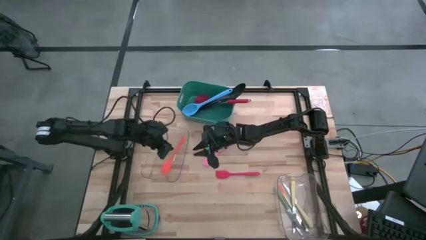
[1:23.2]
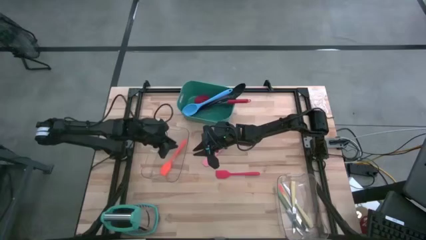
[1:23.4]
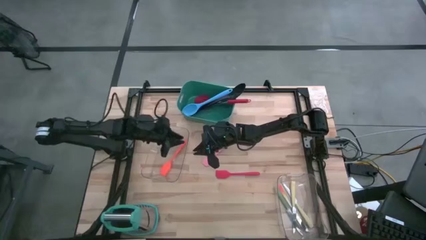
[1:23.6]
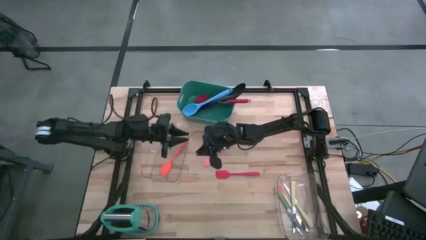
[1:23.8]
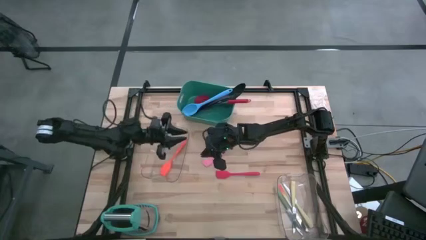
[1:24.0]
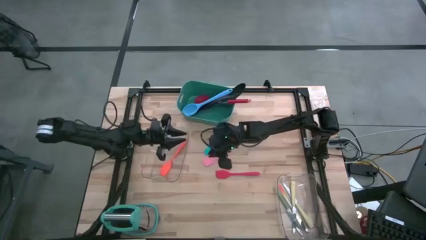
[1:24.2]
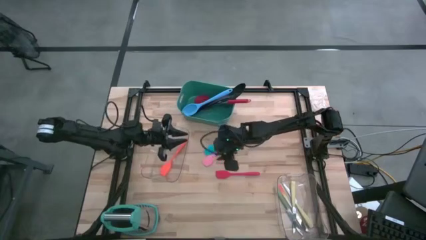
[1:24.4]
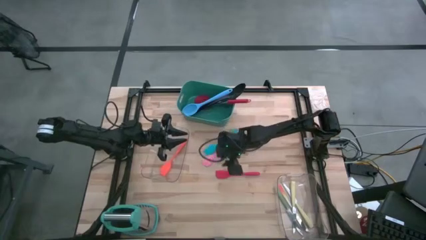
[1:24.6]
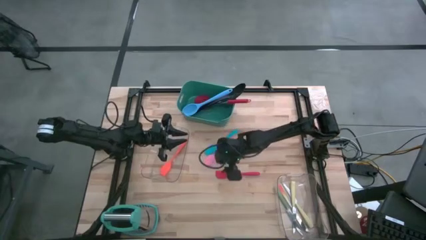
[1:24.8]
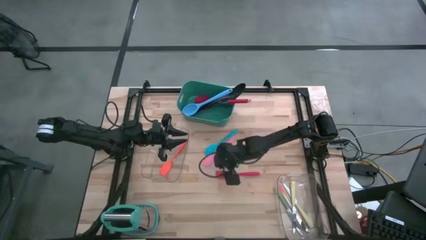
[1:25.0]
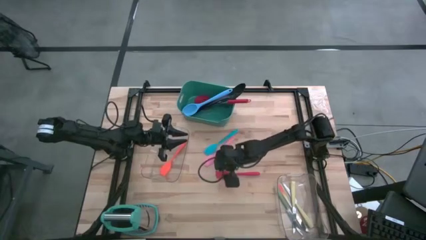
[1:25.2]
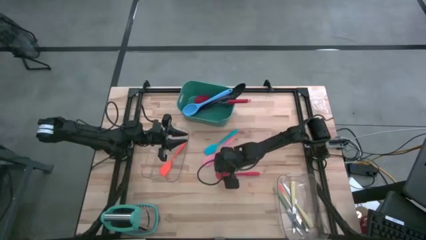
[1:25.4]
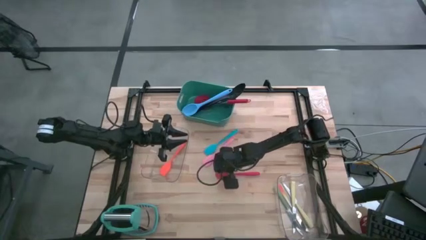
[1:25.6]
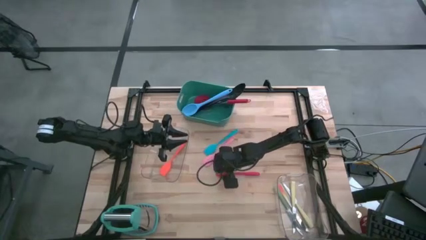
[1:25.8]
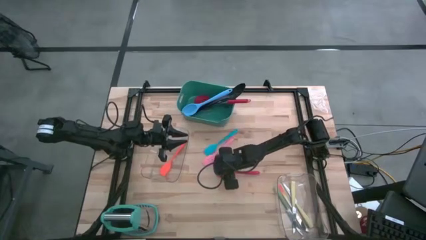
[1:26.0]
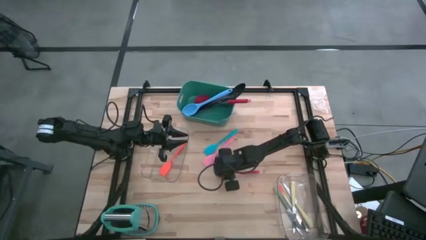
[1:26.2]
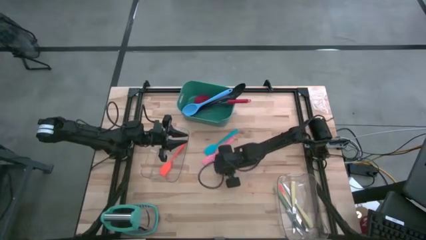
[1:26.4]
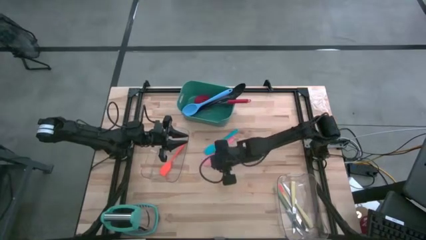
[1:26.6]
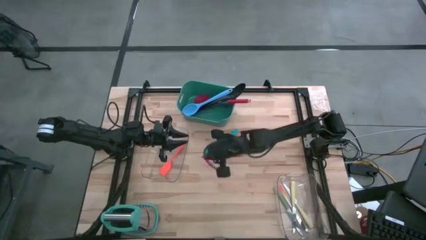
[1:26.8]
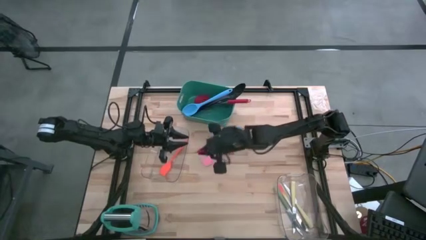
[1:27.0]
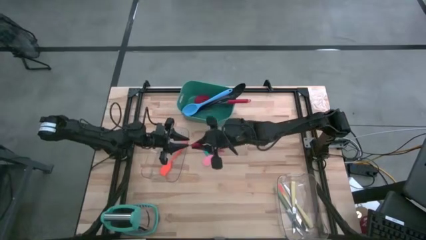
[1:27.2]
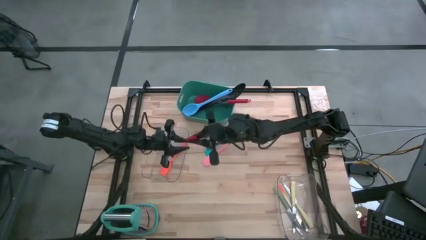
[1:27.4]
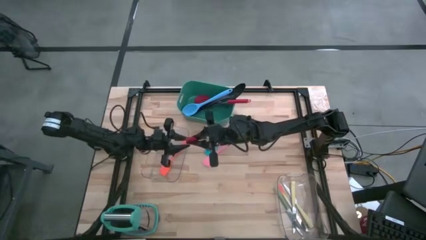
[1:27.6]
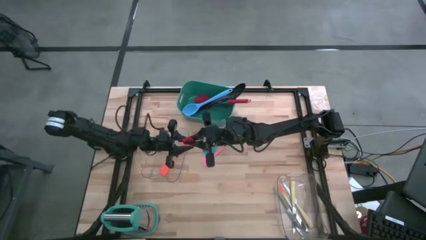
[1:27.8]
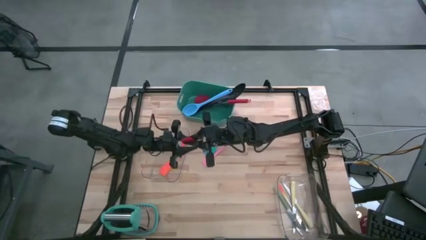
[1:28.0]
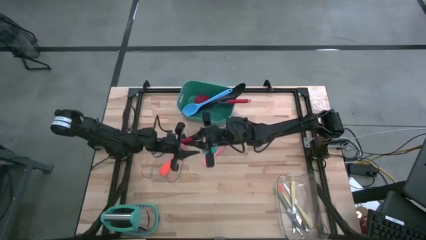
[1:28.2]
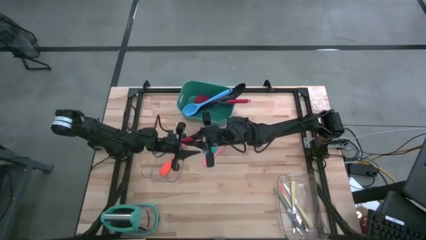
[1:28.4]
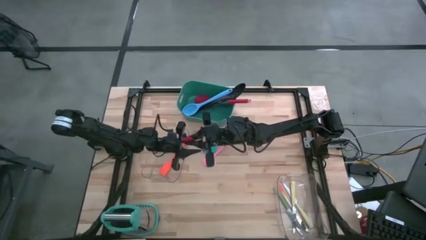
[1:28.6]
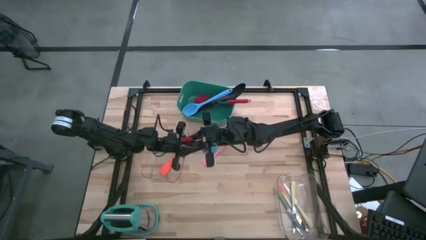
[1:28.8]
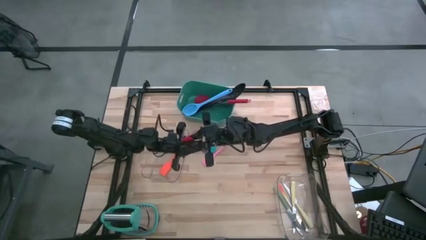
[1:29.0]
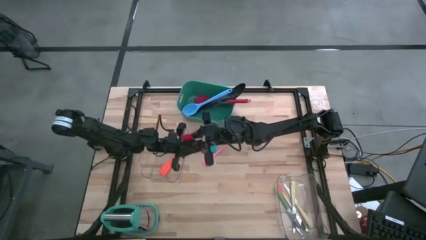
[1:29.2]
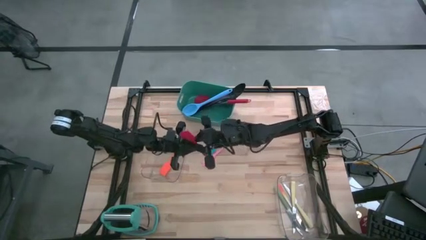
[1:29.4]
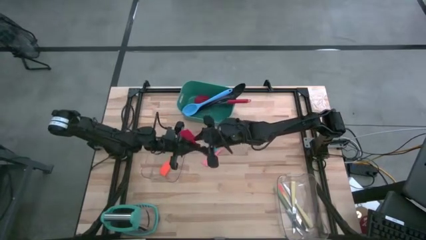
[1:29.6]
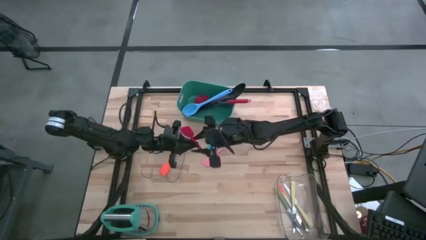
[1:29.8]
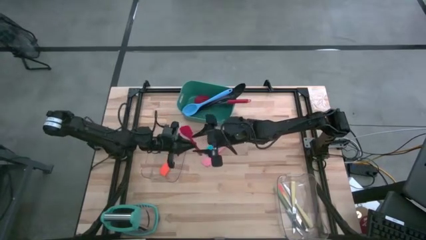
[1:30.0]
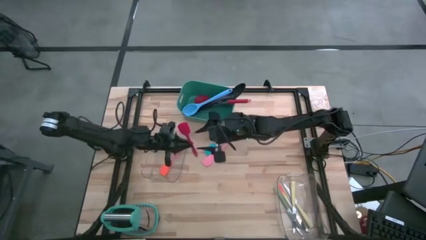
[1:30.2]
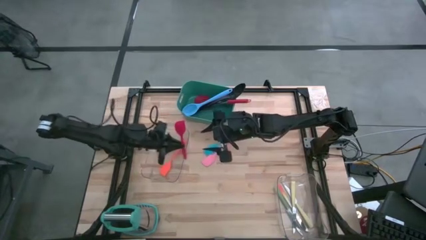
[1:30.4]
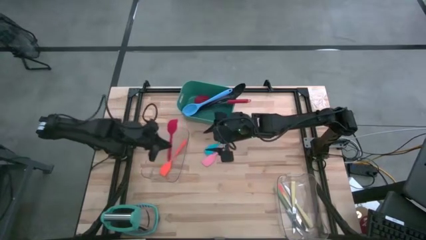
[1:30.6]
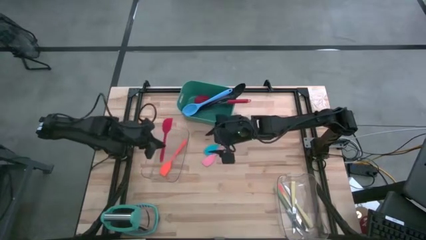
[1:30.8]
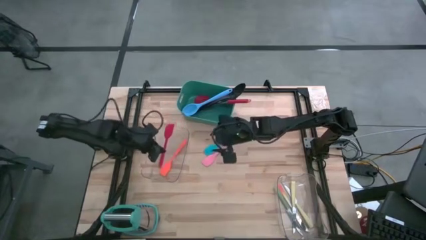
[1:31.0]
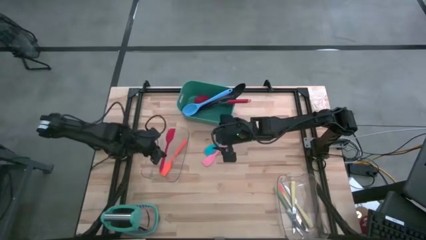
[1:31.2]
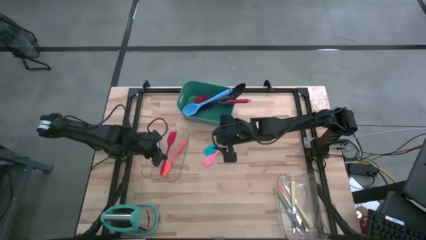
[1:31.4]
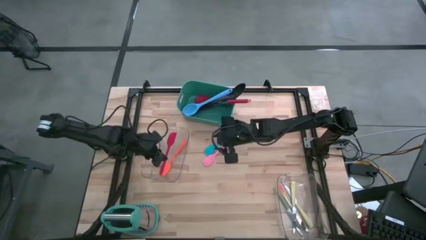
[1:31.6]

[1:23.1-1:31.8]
Task: Pick & Place Kitchen Items
Put the red spatula into the left transparent bin

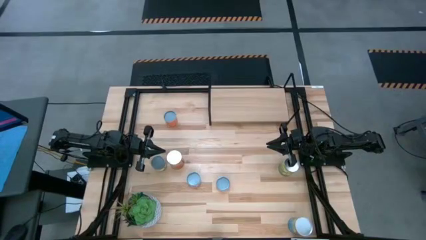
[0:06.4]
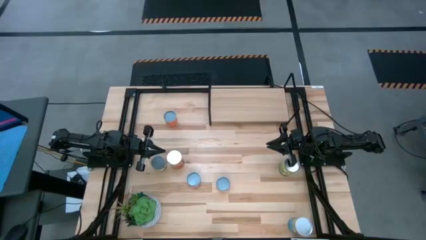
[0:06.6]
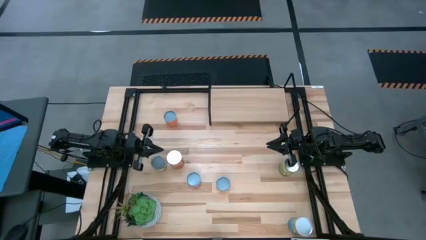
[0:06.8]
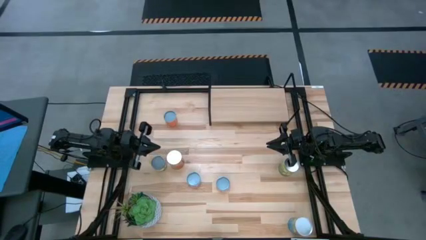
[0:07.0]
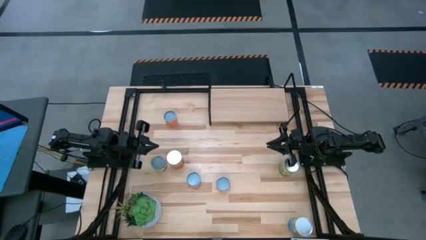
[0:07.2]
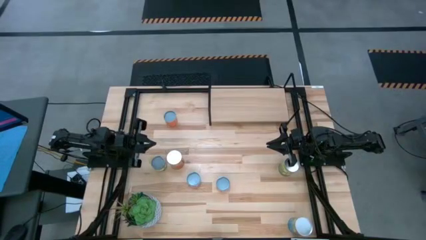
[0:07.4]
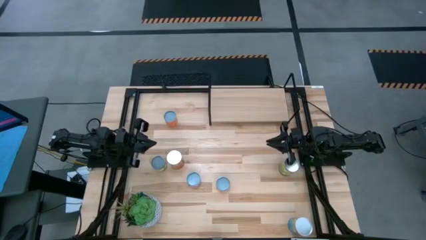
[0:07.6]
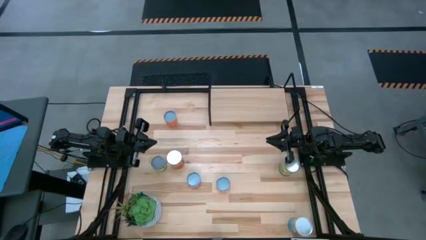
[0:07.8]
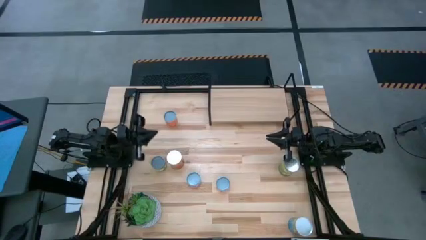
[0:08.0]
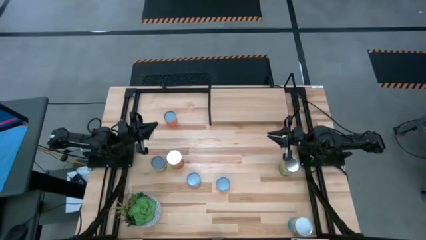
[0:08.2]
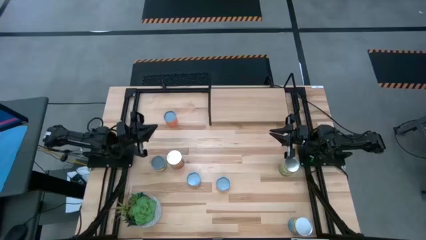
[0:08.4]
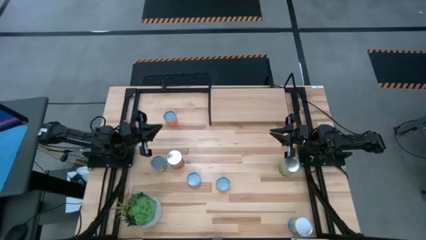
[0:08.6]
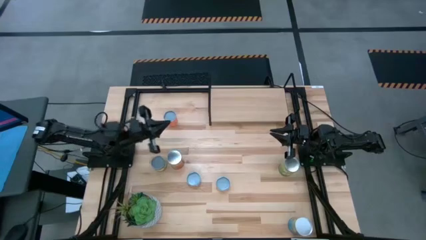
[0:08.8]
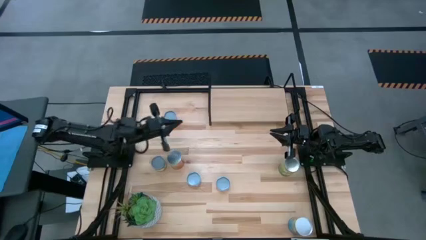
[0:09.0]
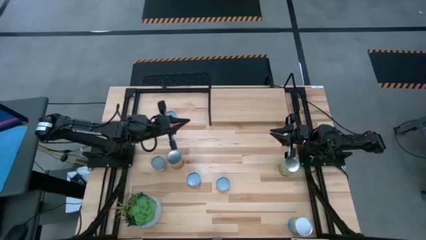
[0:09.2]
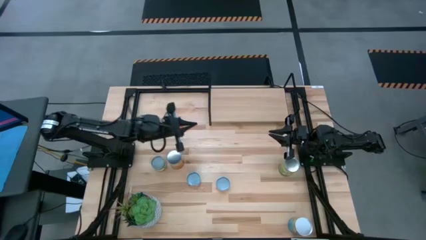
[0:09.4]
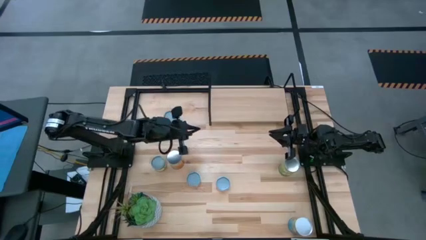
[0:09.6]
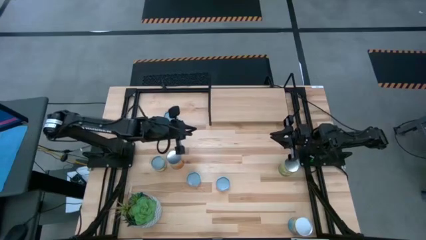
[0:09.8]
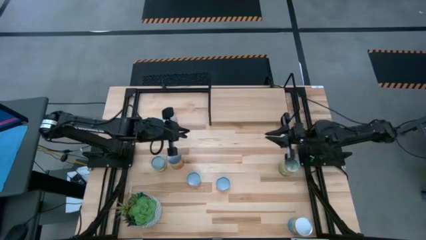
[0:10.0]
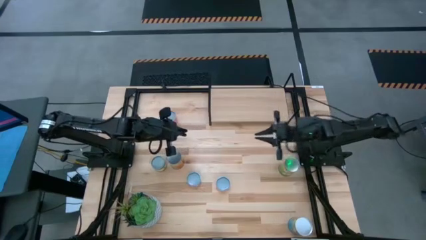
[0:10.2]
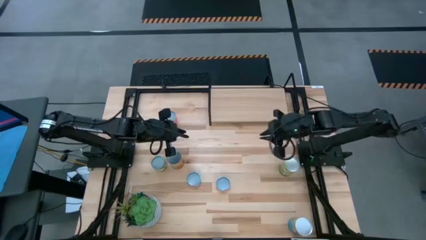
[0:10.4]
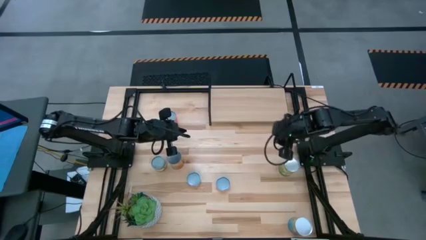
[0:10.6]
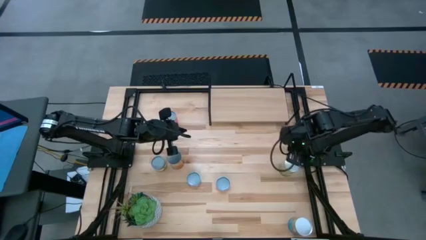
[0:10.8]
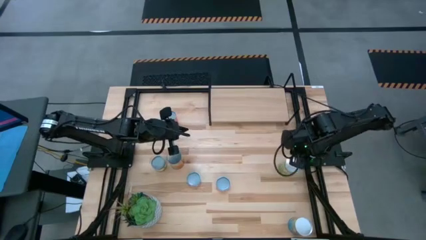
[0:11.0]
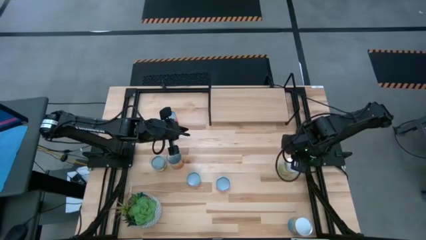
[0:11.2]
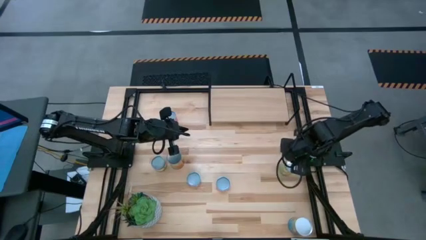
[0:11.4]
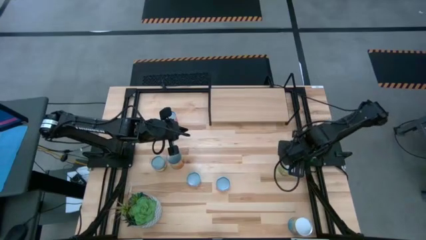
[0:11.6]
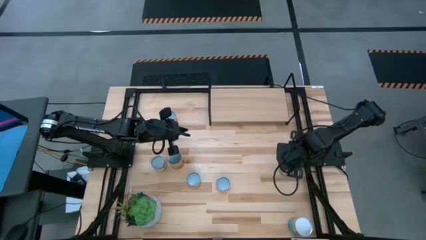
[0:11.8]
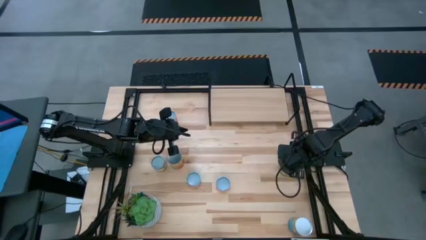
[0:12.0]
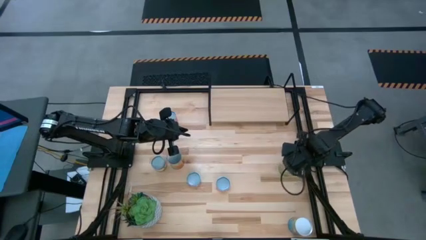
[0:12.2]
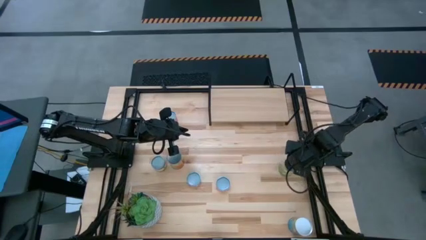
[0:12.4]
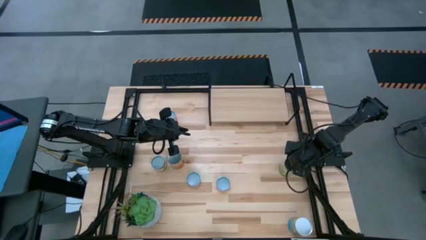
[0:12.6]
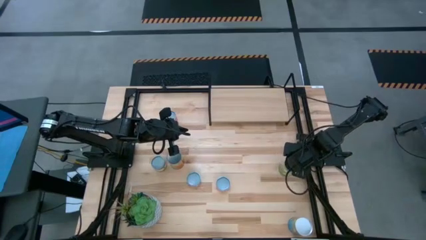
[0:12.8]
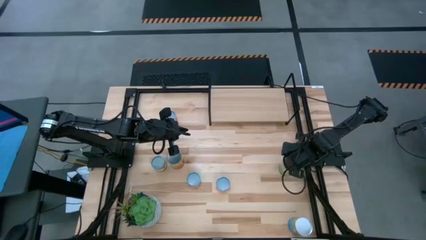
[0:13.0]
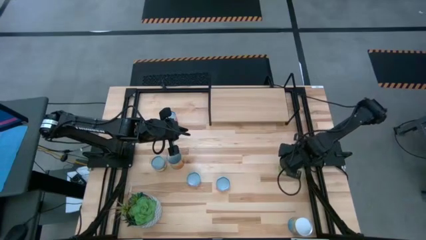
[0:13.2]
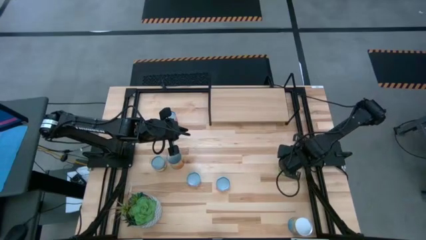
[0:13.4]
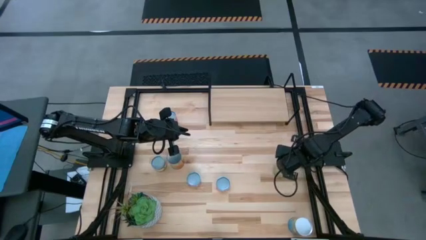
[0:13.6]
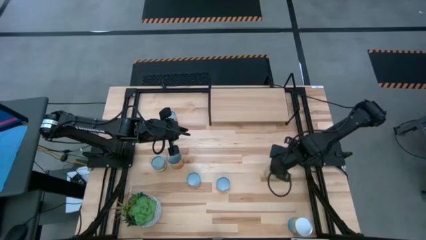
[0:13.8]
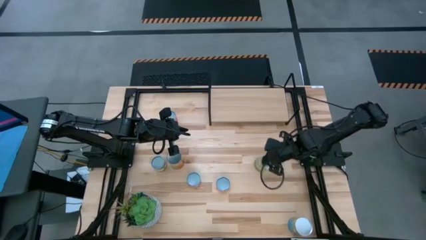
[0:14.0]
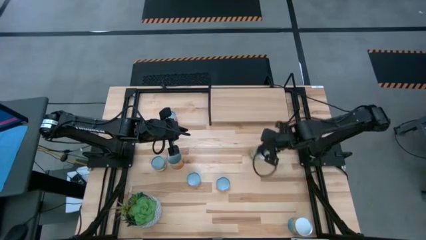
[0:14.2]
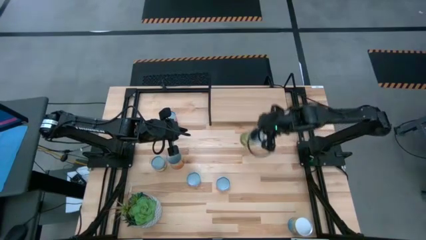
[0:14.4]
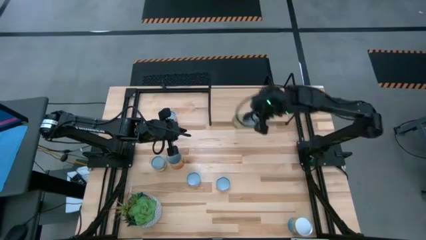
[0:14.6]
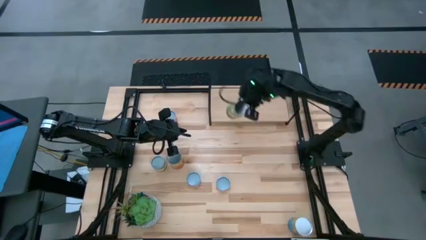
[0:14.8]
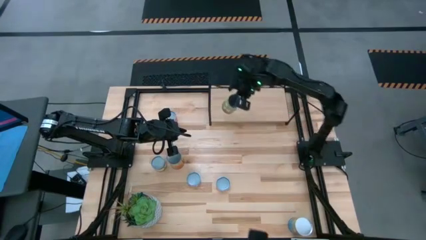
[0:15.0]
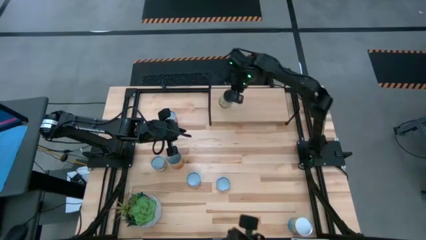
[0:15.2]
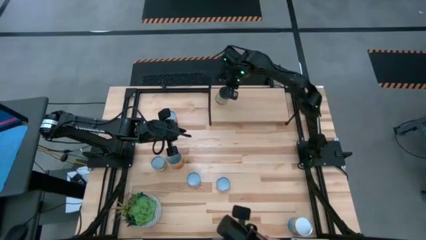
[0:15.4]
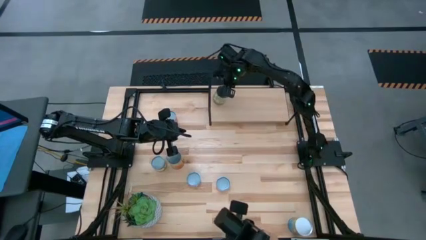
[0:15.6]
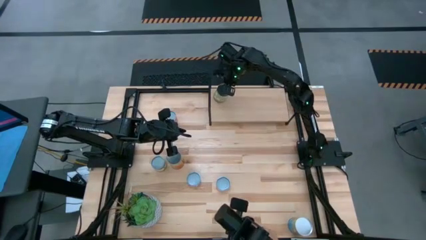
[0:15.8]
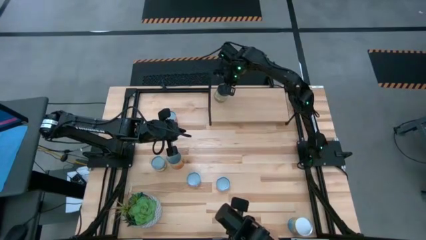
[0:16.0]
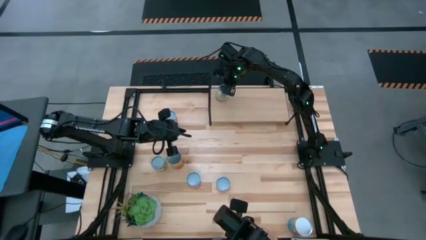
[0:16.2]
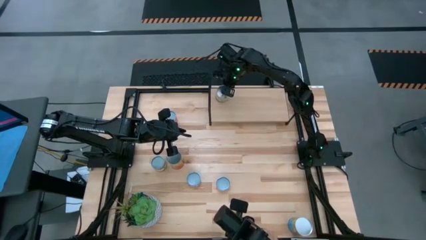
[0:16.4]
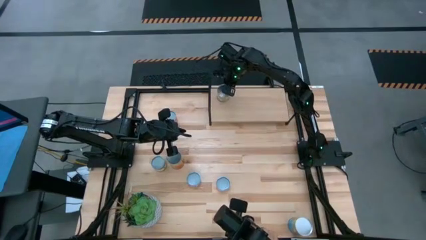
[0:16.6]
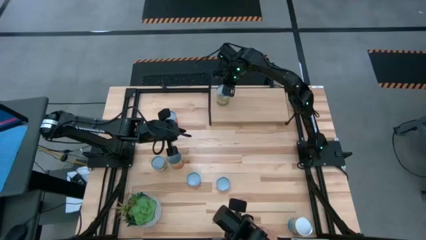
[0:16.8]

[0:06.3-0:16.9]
Task: Pick and place cans onto a shelf
Put the canned pears on the shelf
